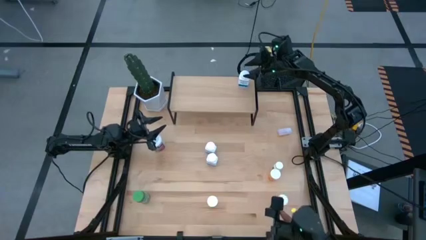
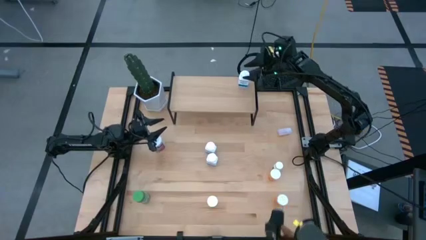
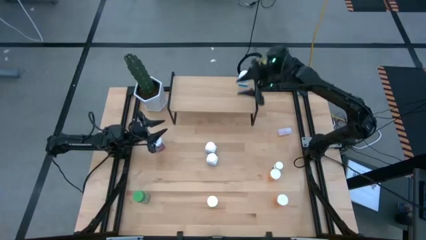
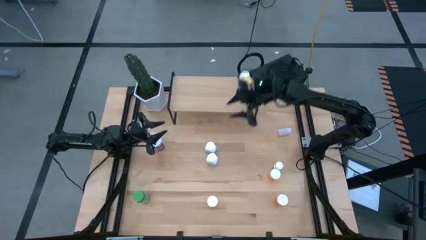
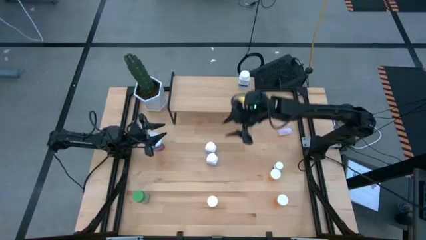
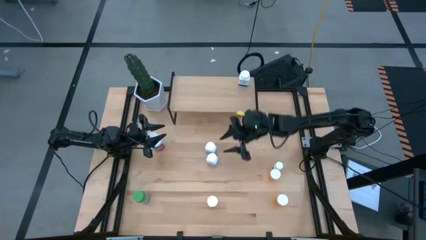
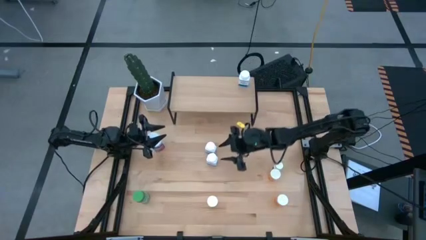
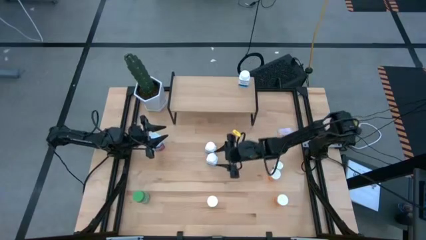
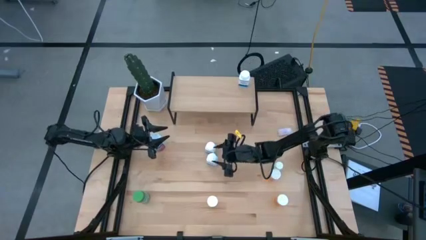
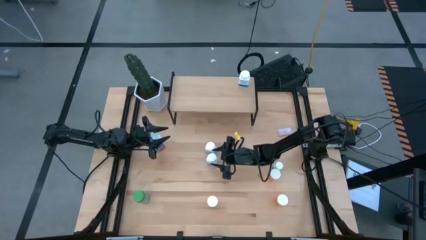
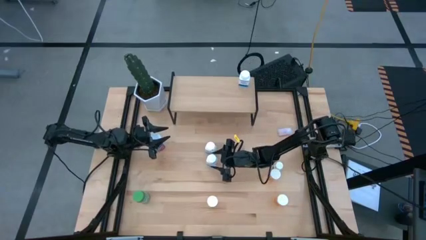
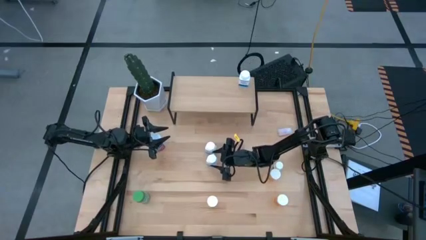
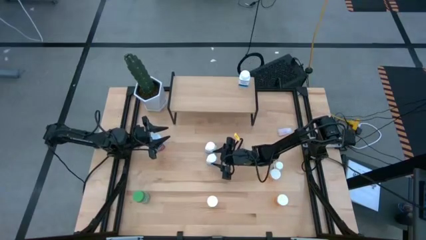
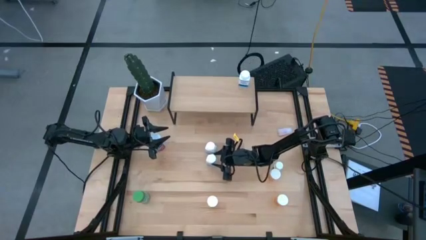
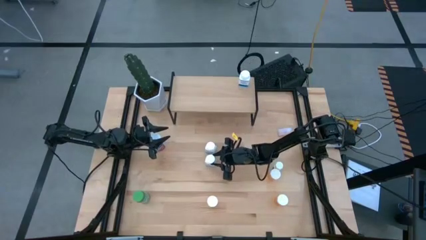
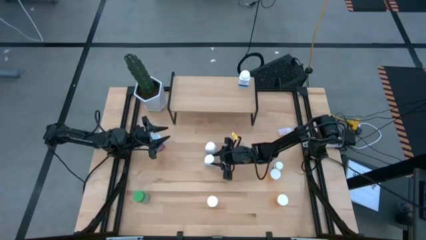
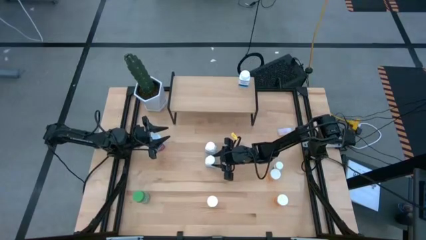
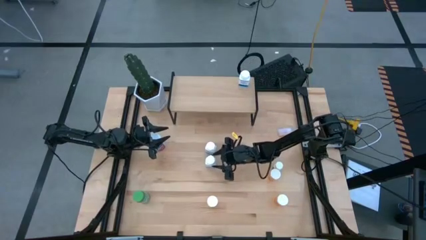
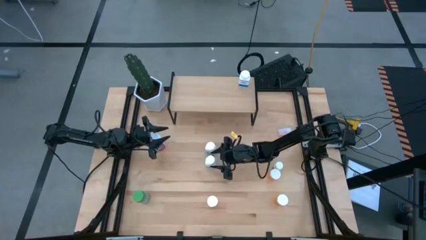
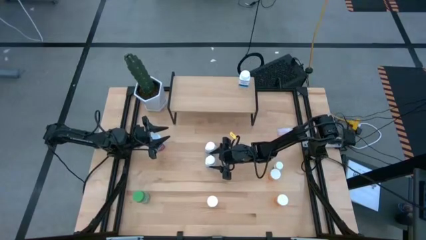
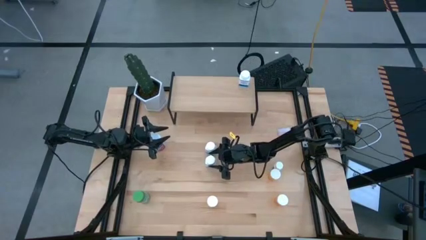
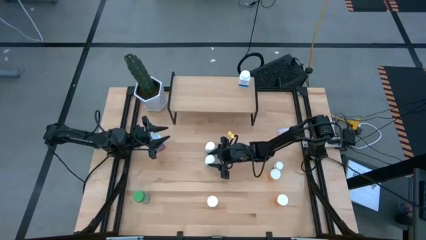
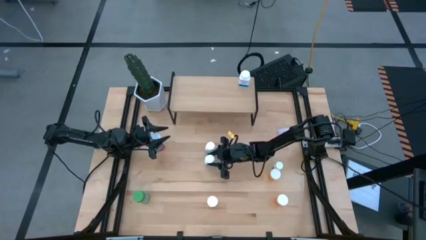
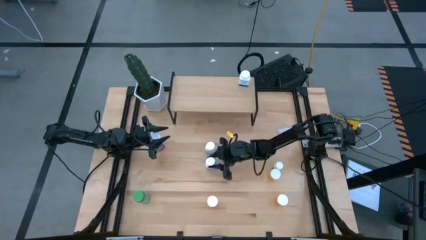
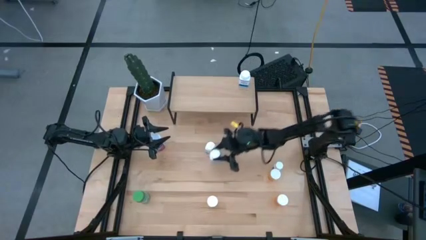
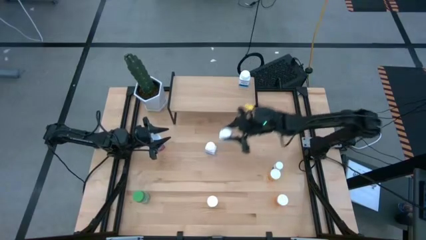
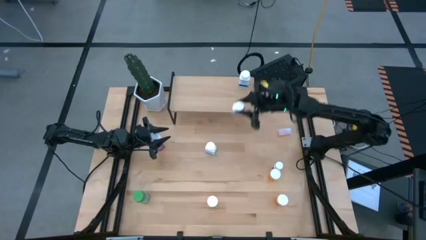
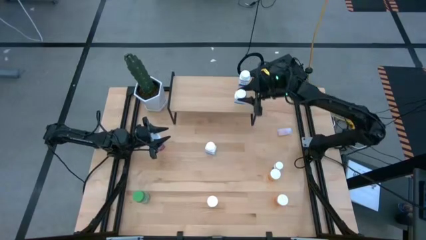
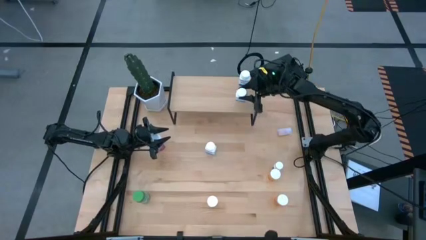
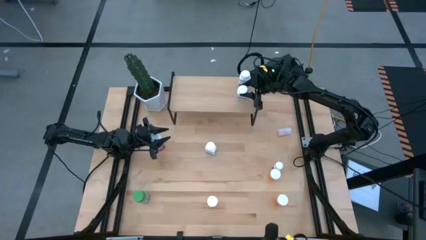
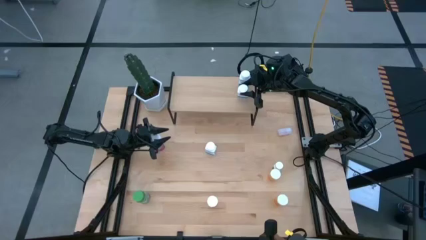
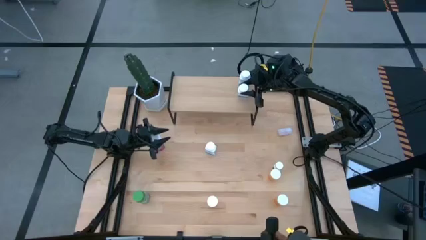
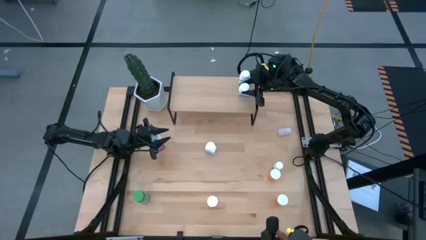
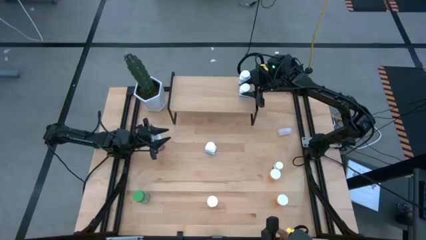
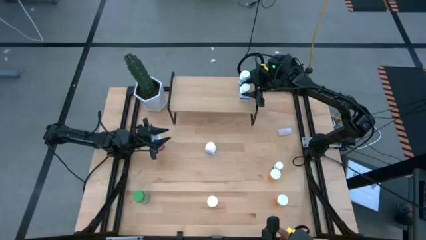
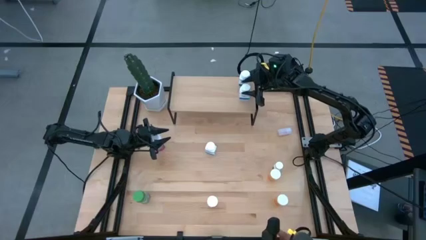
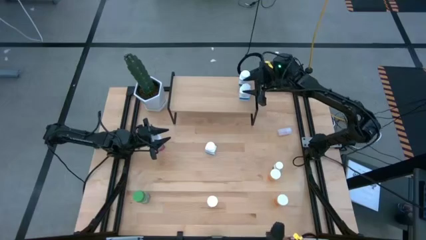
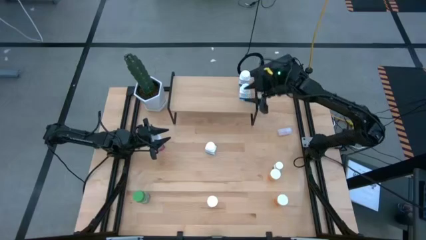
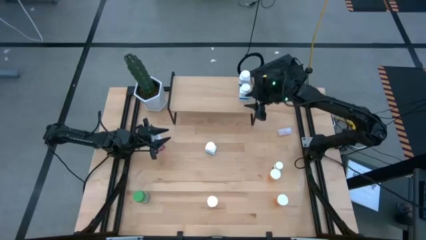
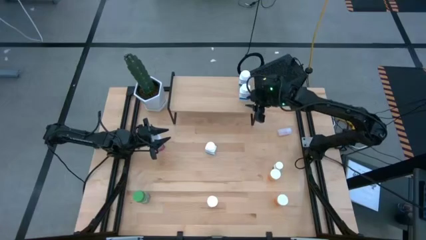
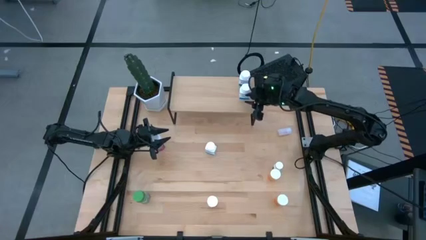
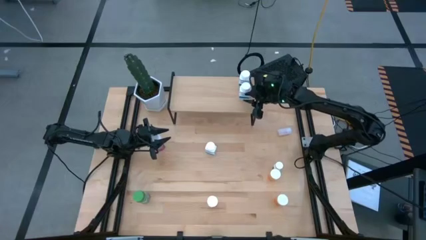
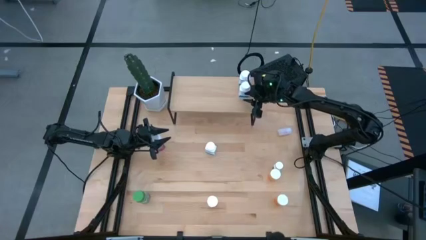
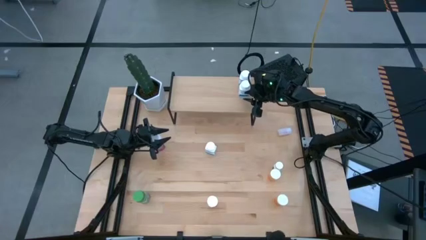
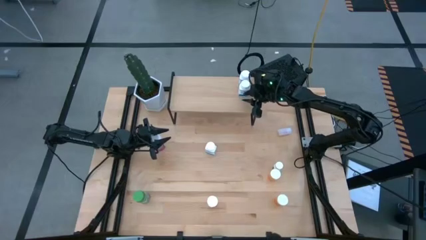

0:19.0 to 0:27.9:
Task: Pick and place medicine bottles onto shelf by color
Put the bottom white and blue pill bottle aligned with the other white and blue pill bottle on the shelf

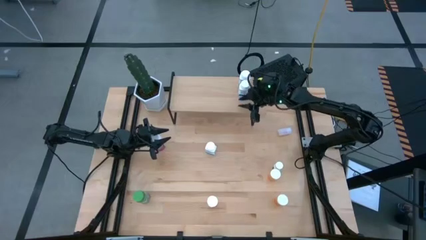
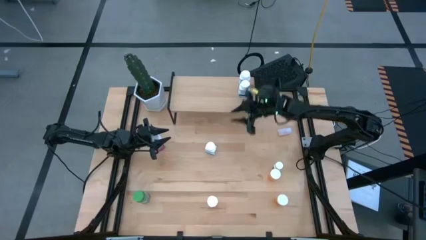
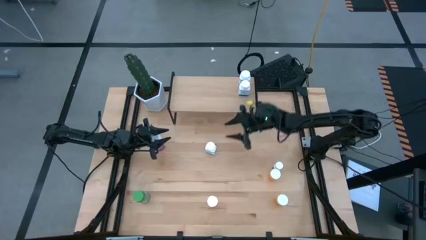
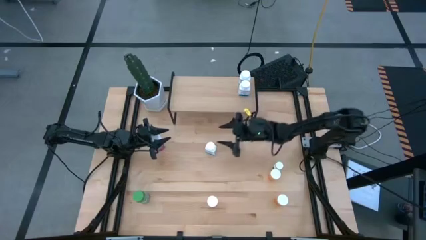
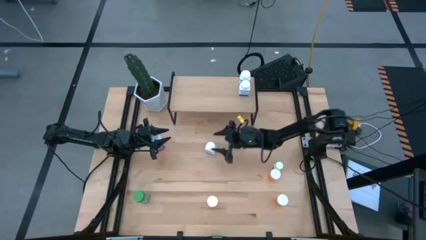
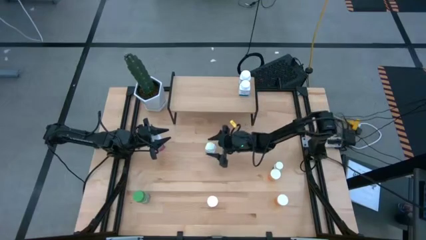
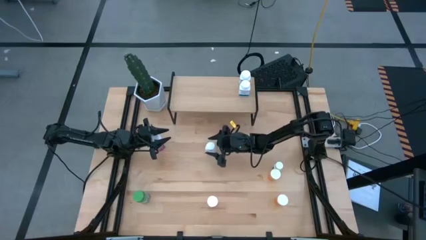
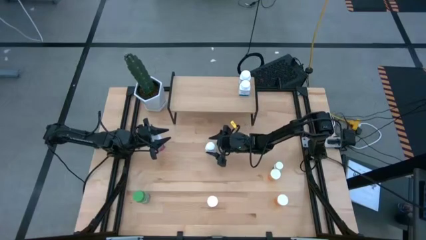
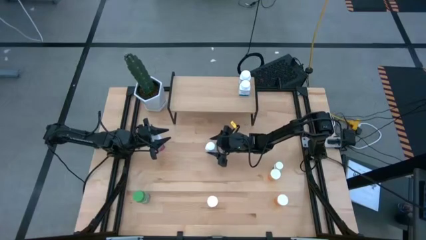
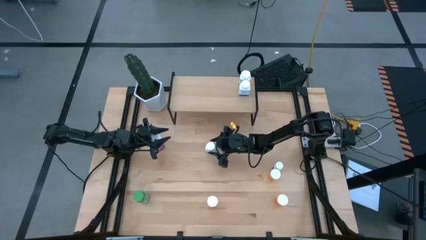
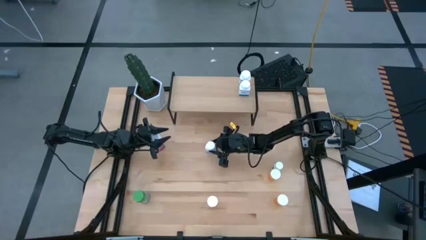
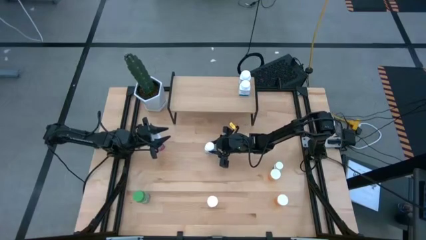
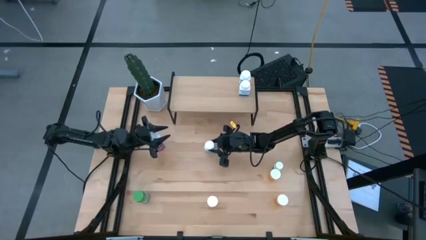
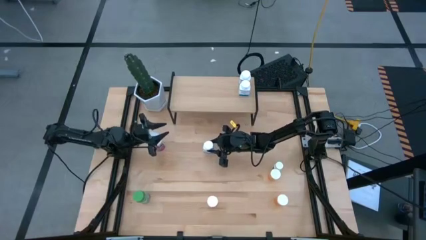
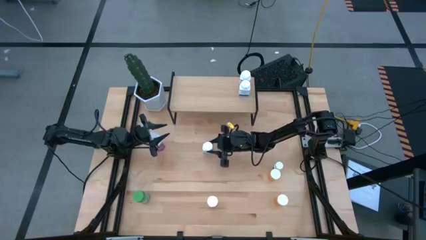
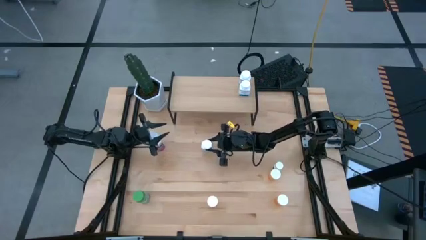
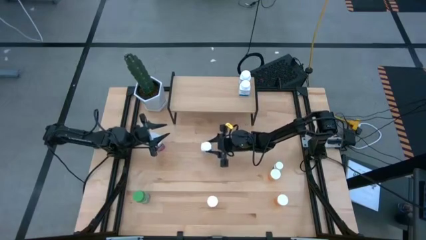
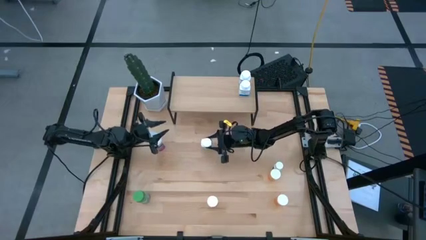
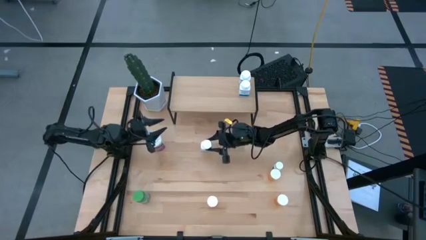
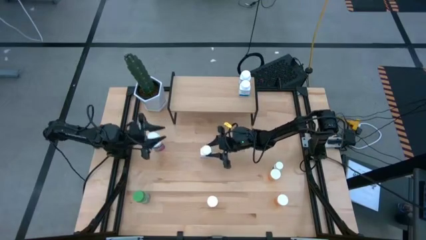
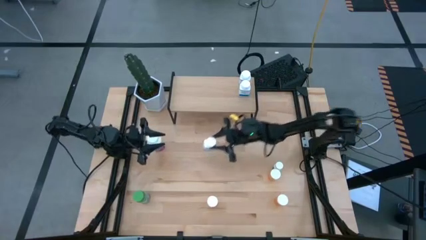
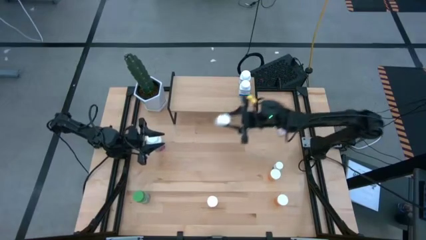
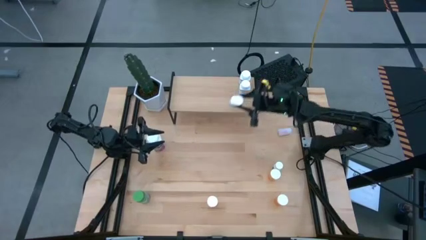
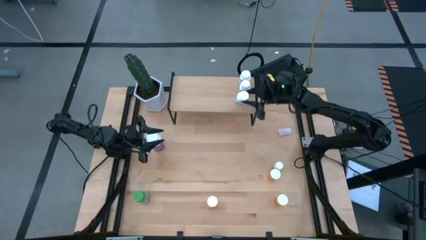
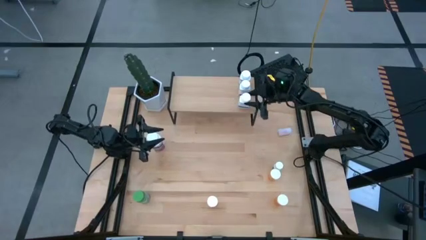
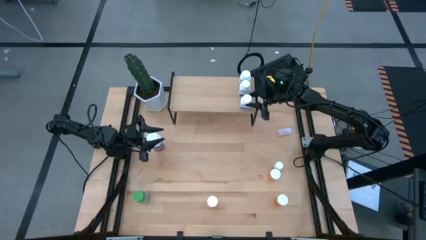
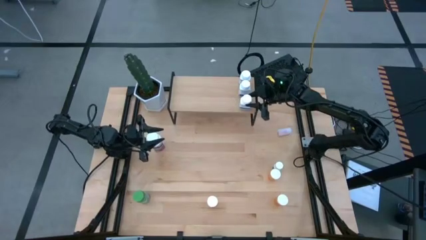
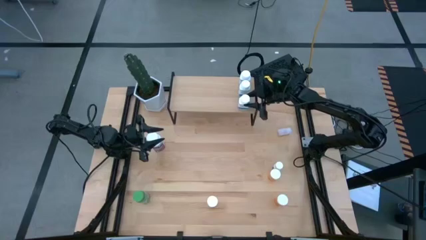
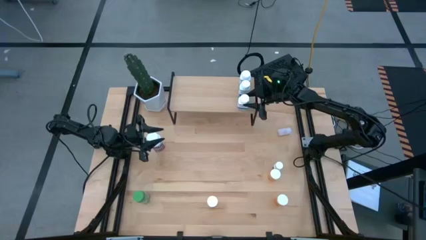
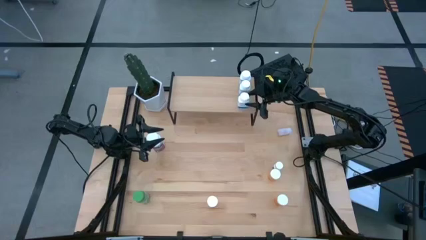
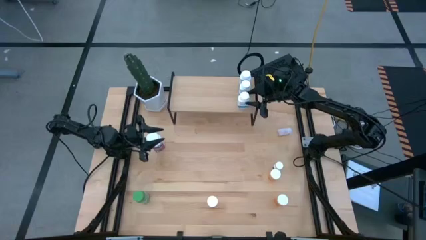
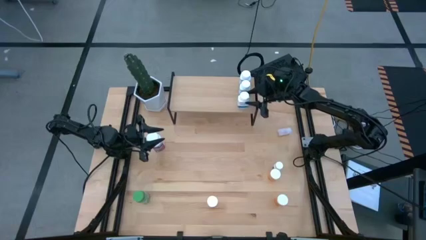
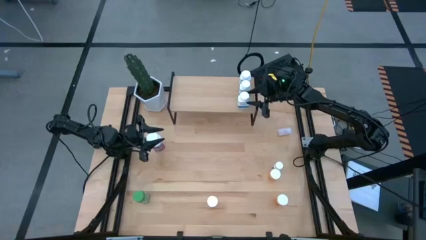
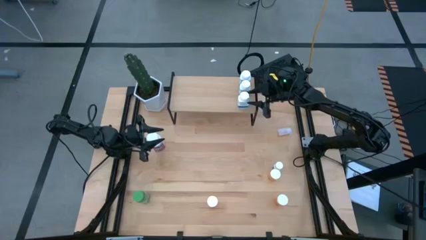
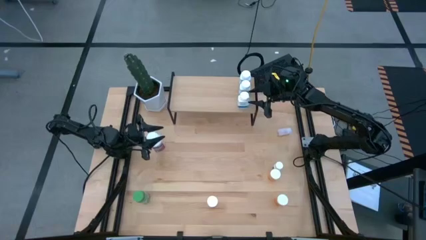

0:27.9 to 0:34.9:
Put the white and blue pill bottle aligned with the other white and blue pill bottle on the shelf

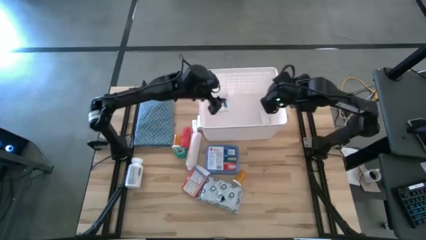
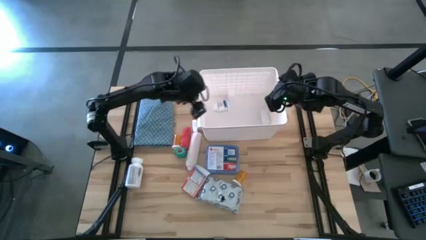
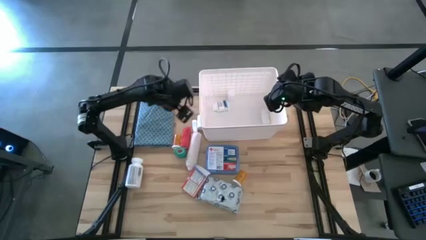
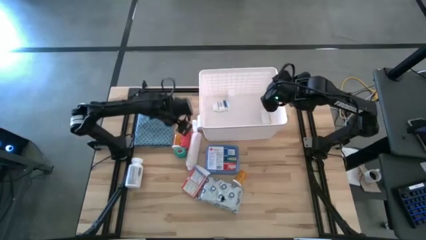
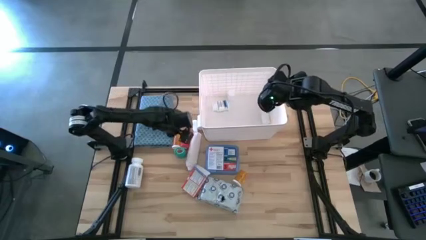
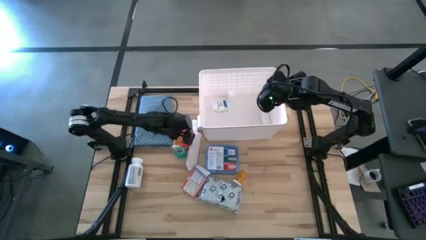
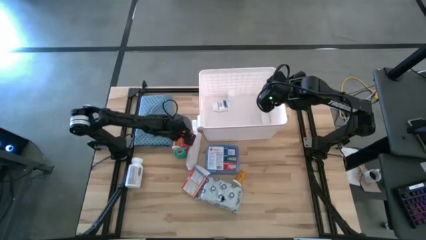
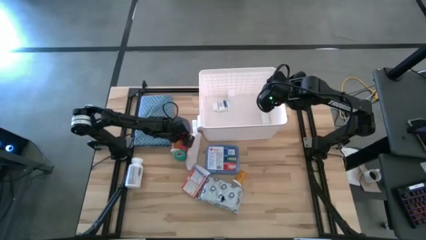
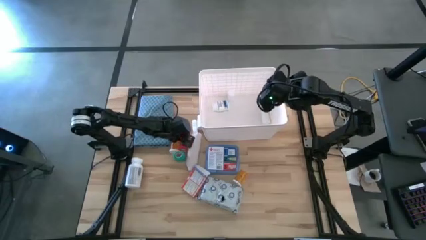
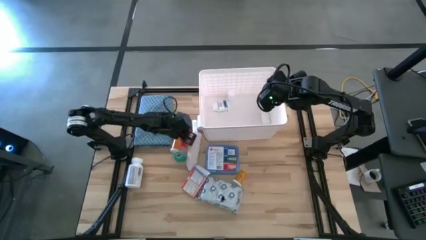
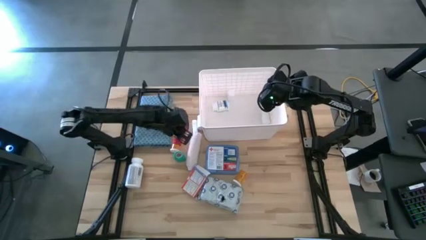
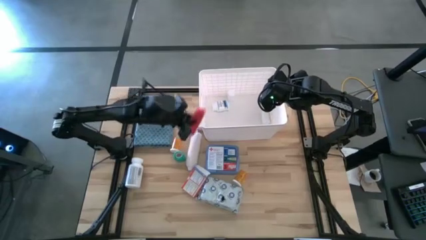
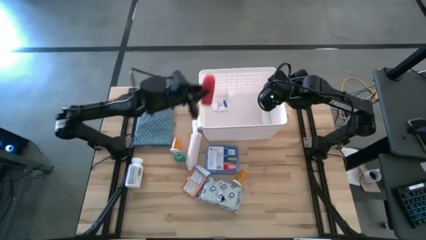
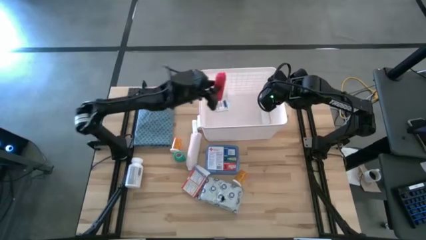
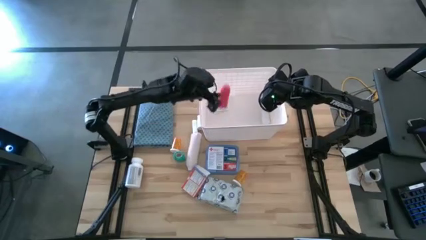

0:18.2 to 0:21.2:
Task: Pick & place medical supplies in basket/bin
Put the red bandage into the white bin
